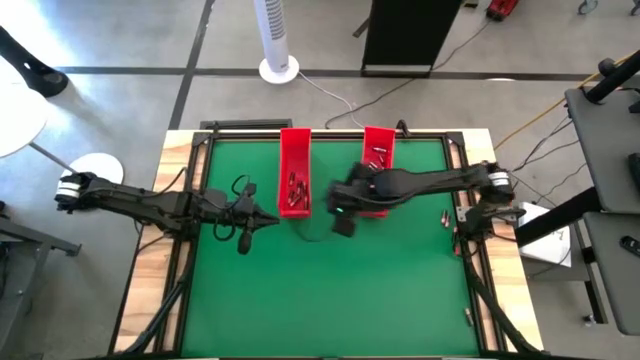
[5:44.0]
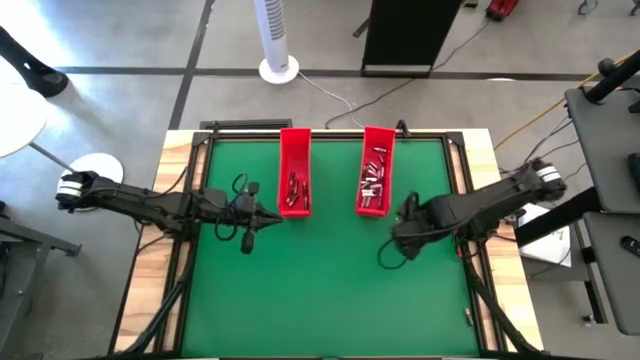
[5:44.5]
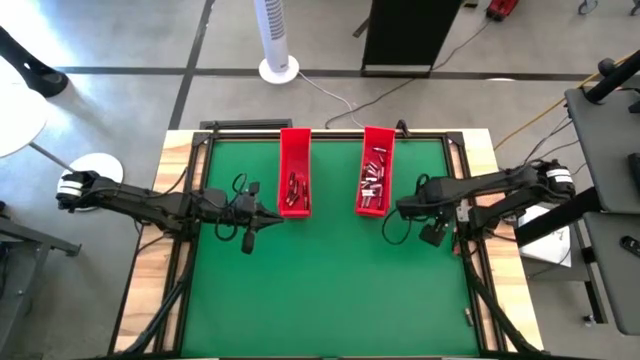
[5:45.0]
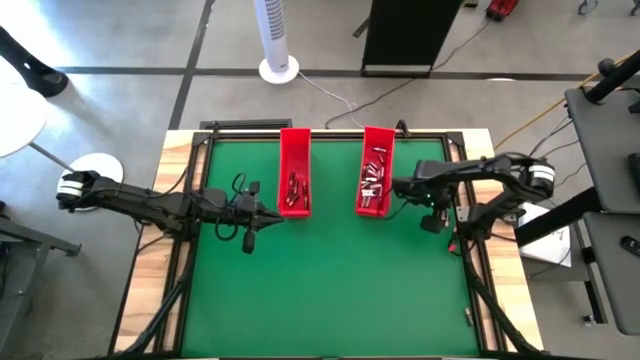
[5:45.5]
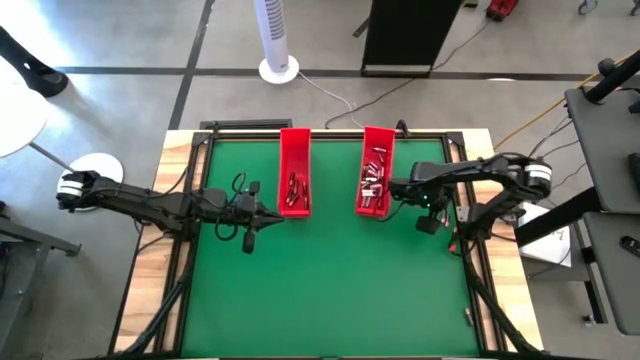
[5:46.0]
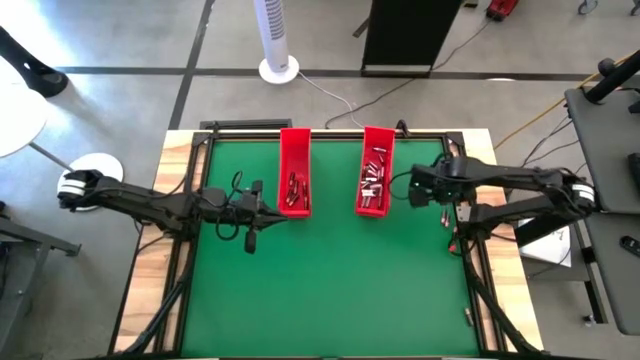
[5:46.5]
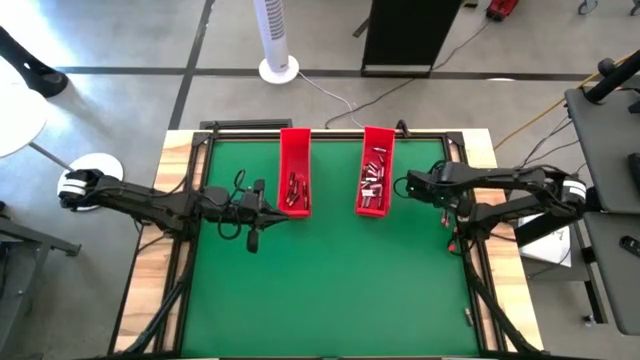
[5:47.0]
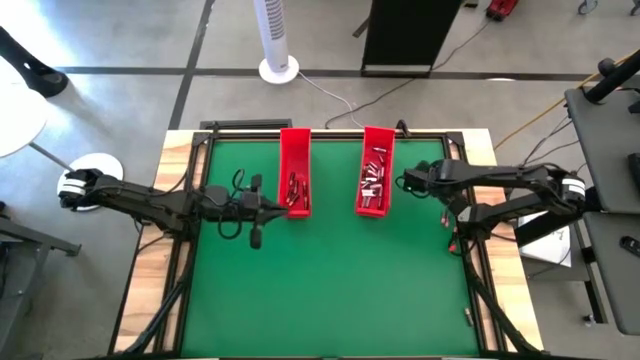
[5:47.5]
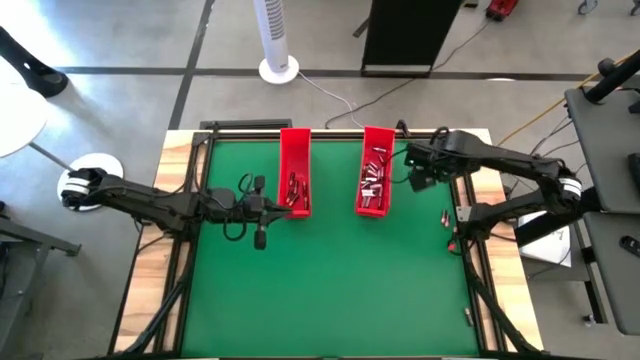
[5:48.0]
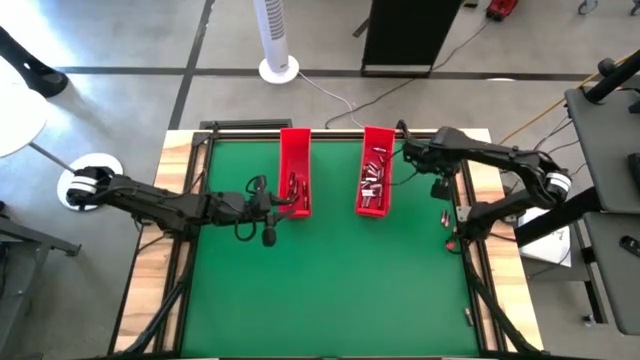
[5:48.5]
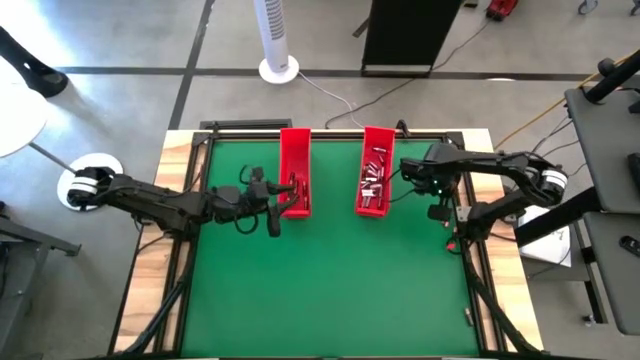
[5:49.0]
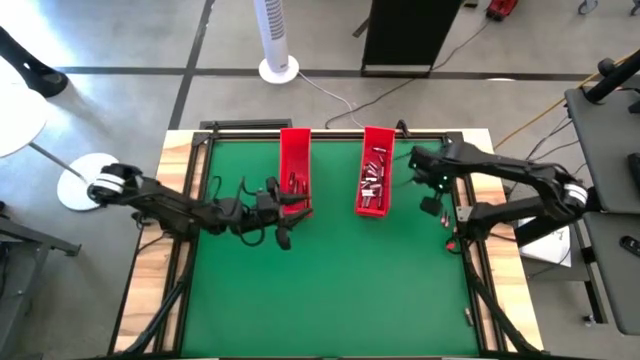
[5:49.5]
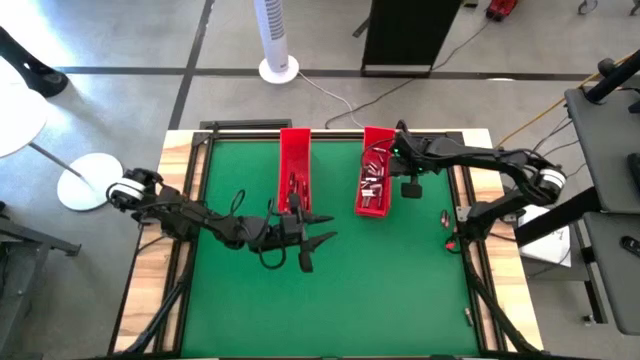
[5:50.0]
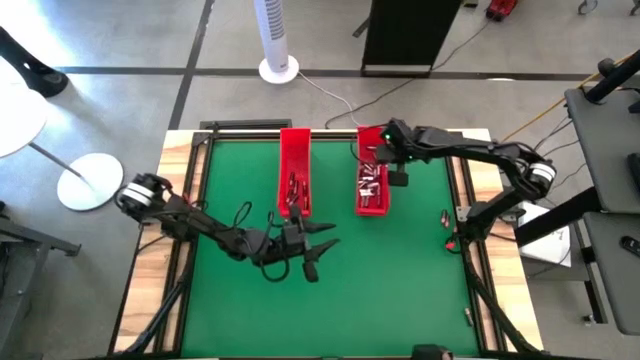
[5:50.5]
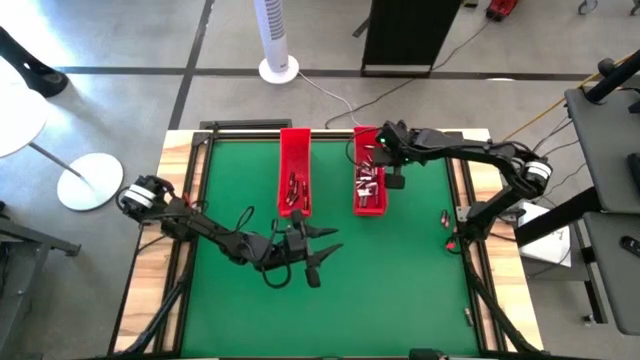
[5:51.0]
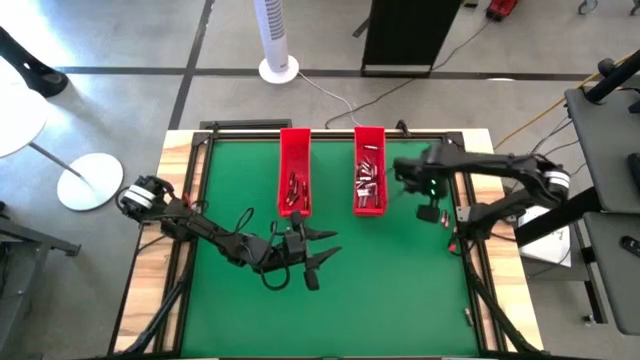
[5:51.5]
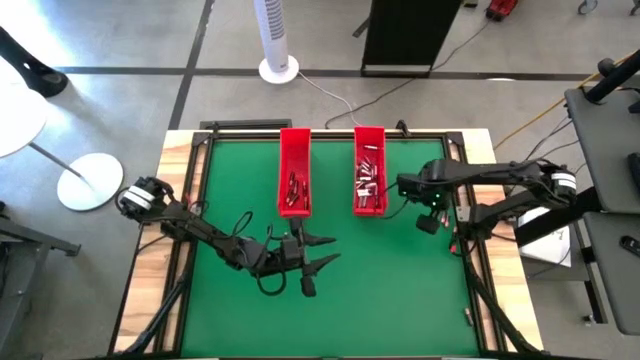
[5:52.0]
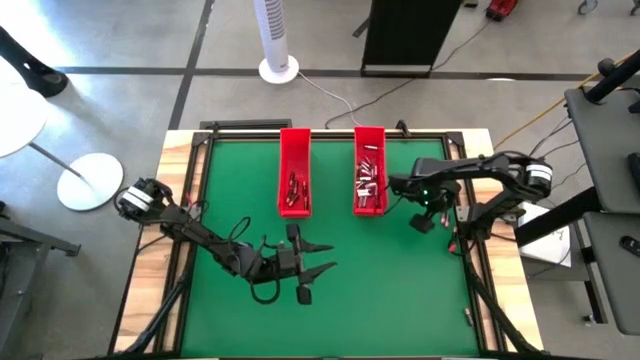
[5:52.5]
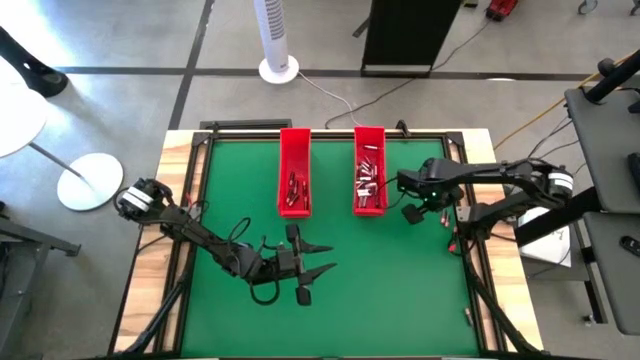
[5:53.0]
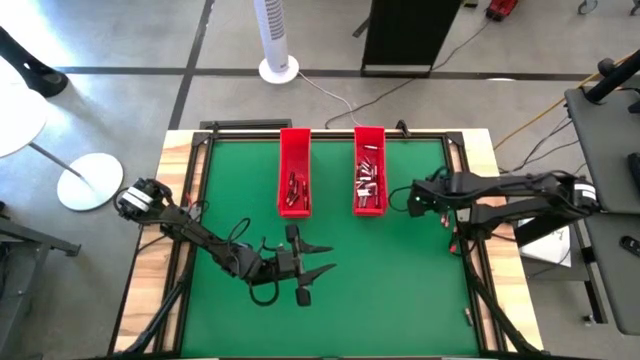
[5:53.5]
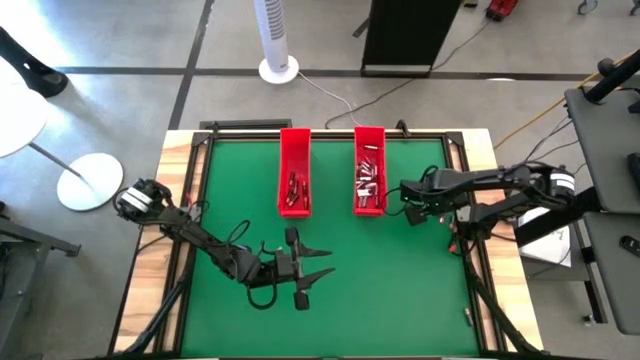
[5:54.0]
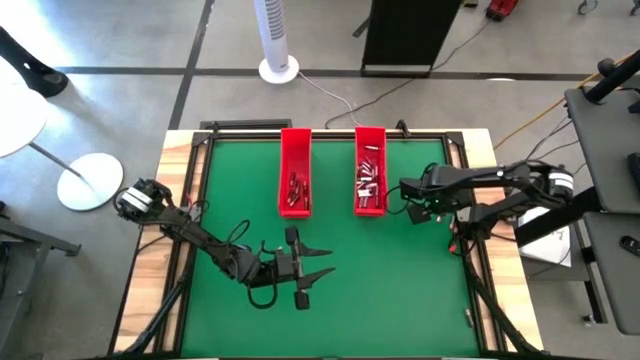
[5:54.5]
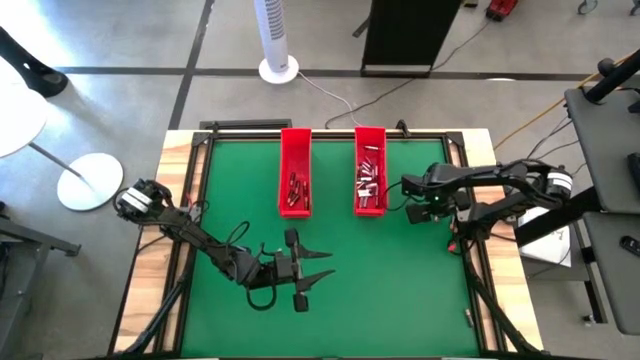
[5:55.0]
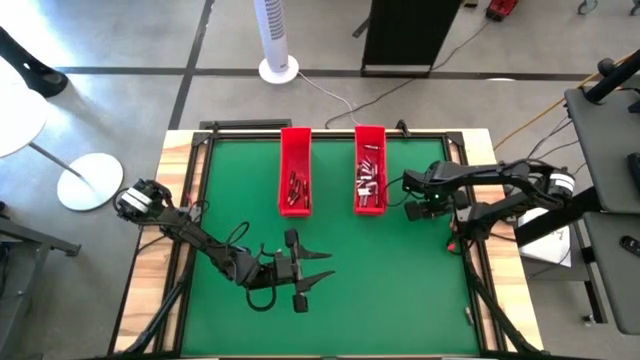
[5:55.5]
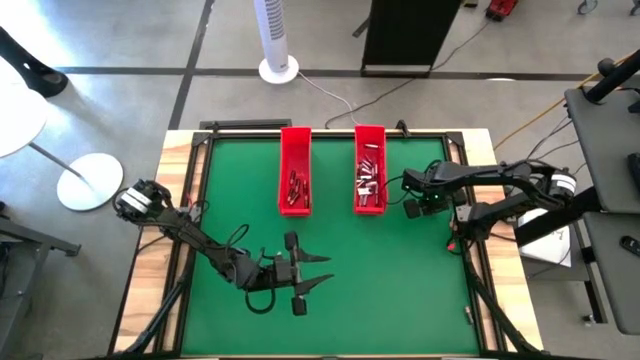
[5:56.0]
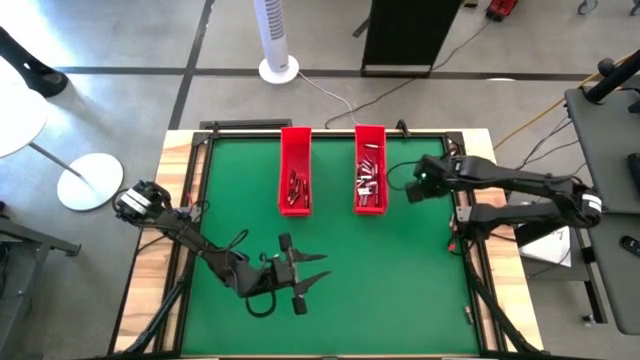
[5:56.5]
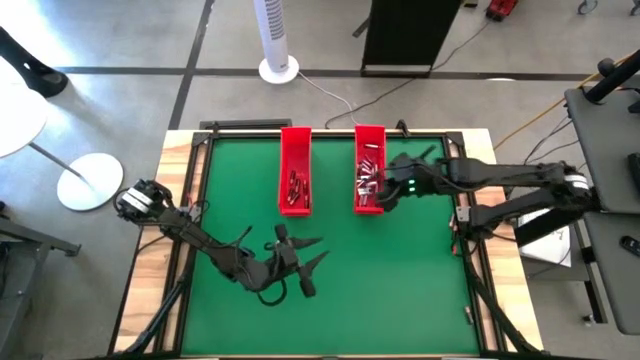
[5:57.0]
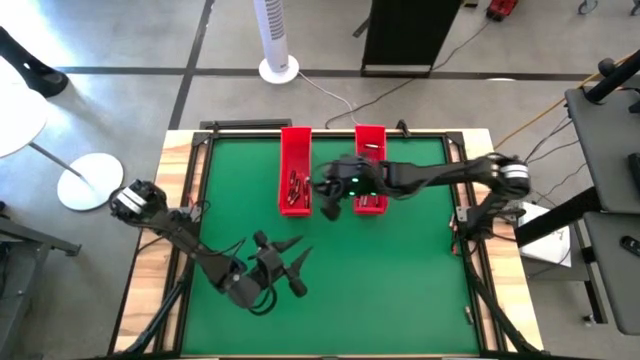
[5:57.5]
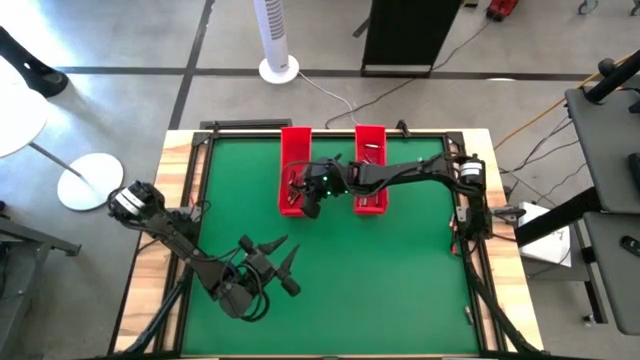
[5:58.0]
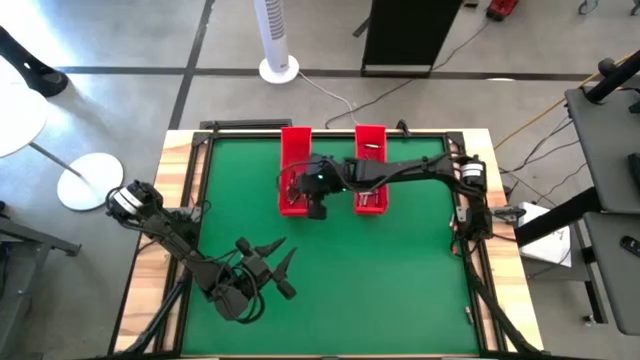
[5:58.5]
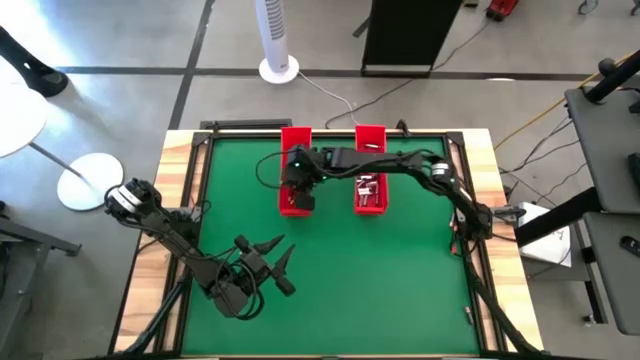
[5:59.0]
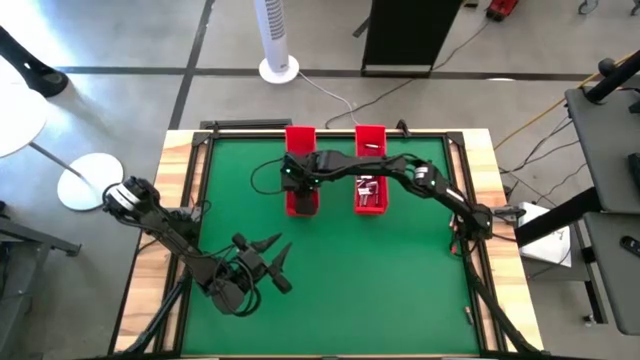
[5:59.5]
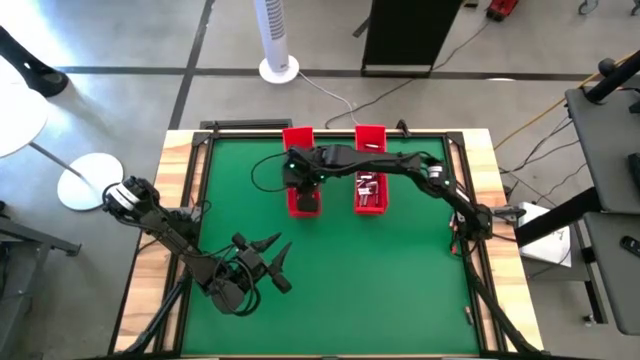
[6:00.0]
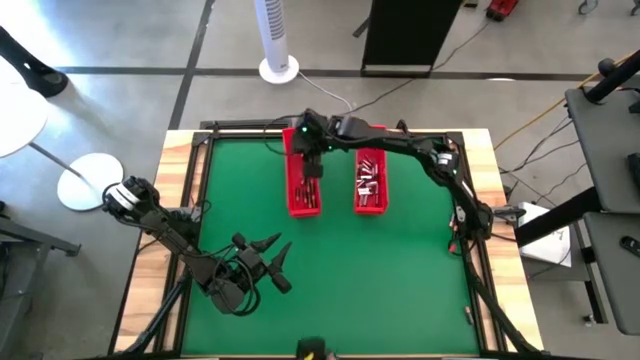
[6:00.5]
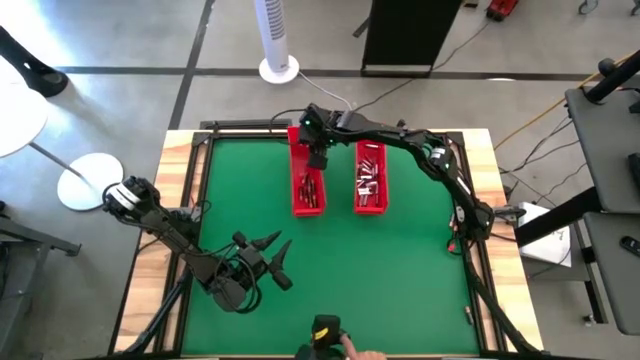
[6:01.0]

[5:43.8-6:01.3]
Task: Sort batteries
Put the black battery into the left red bin

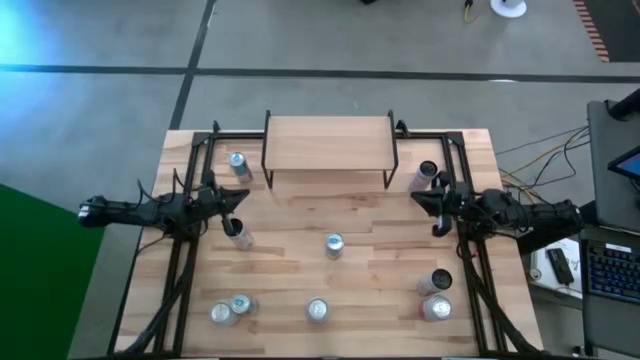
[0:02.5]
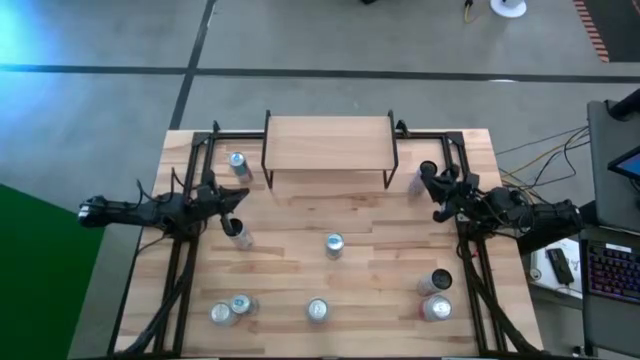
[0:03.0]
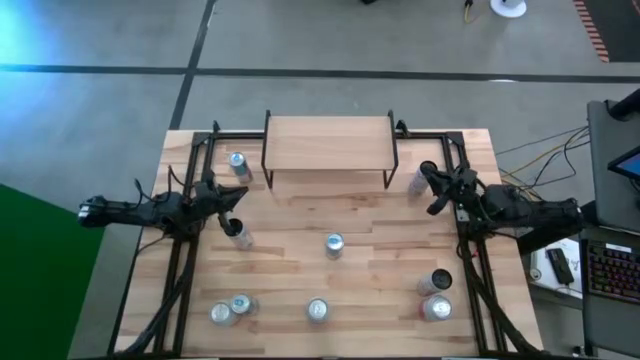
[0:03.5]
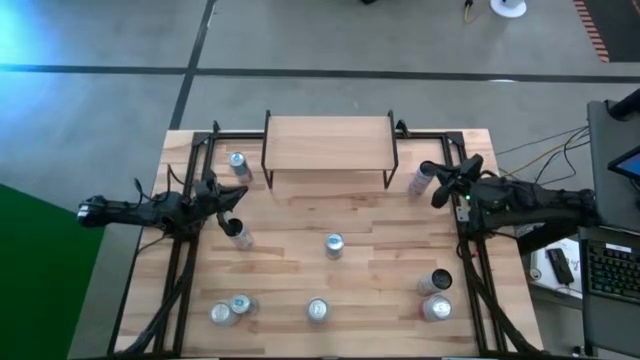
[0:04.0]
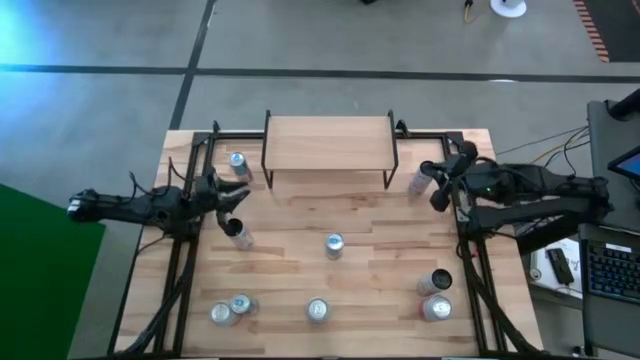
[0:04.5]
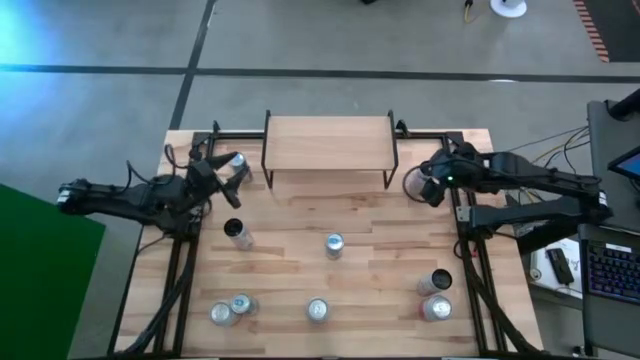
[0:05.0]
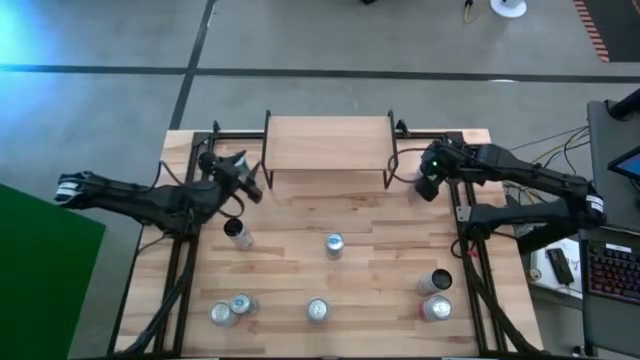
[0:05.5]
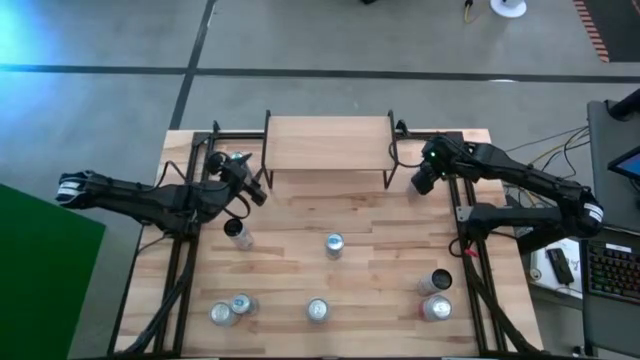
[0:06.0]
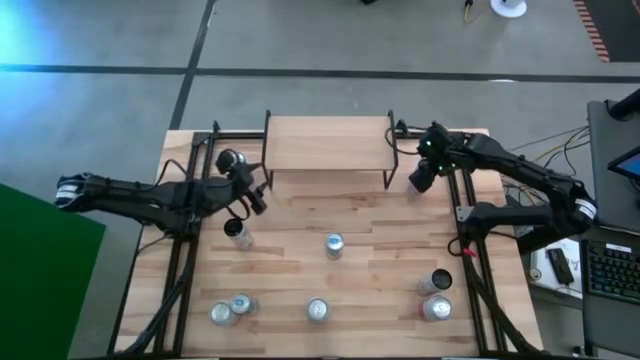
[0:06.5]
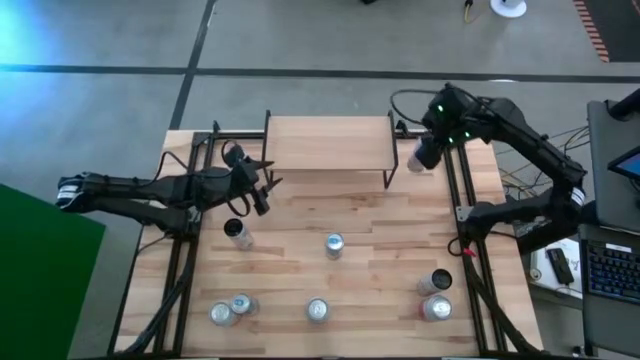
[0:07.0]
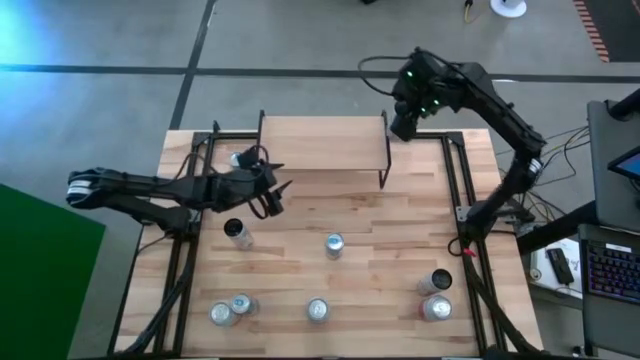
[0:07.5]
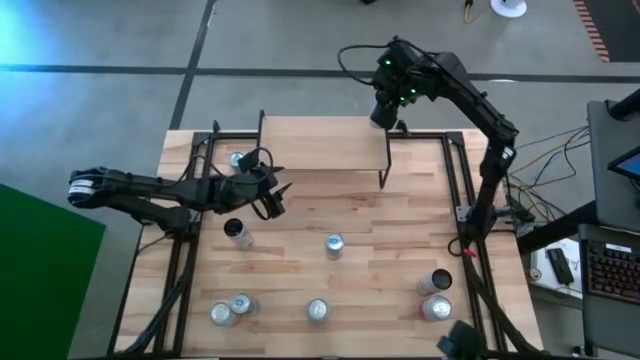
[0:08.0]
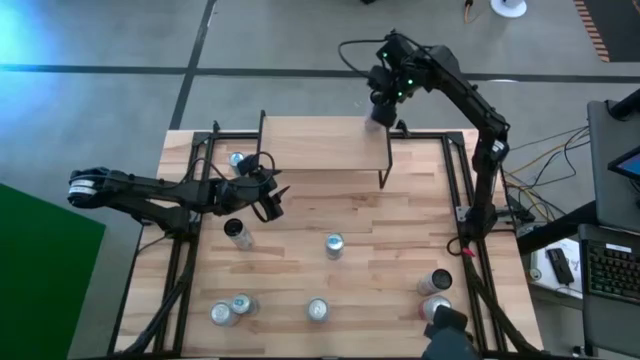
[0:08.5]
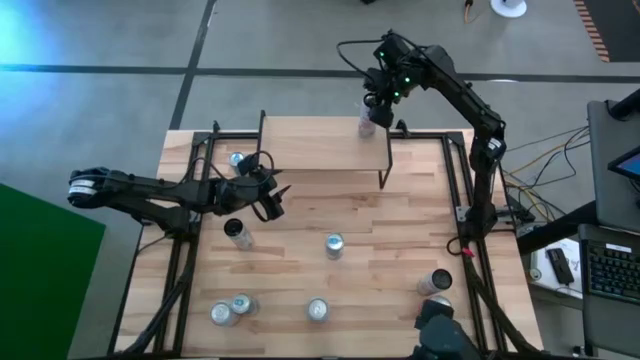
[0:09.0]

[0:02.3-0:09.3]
Task: Place canned beverage on shelf
Put the top white soda can on the shelf
